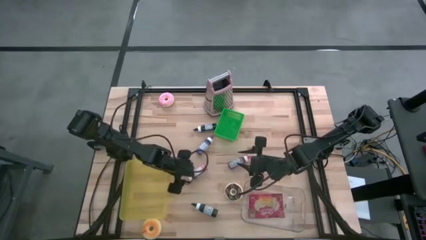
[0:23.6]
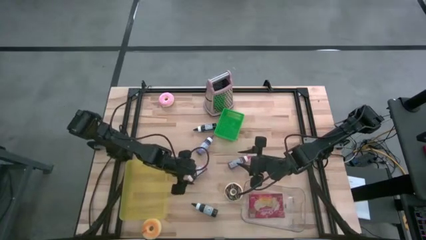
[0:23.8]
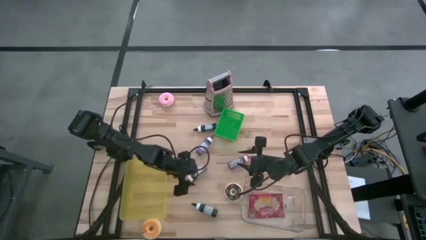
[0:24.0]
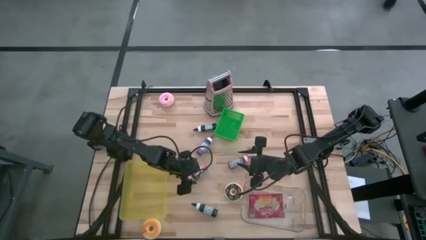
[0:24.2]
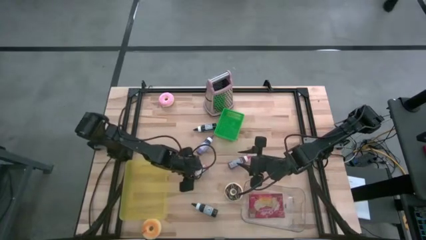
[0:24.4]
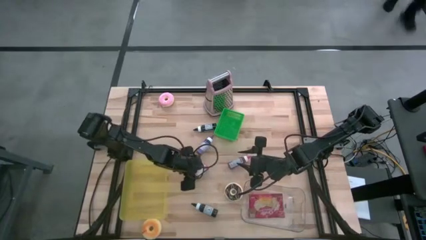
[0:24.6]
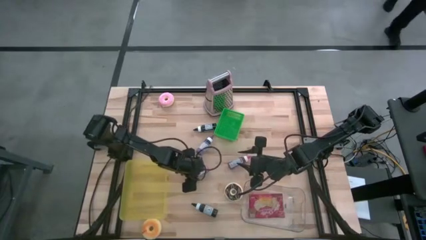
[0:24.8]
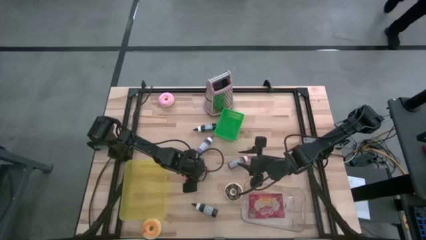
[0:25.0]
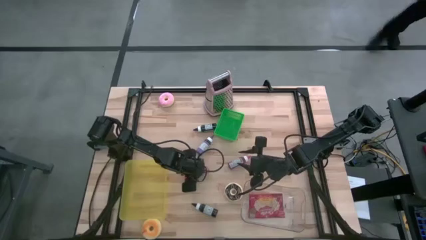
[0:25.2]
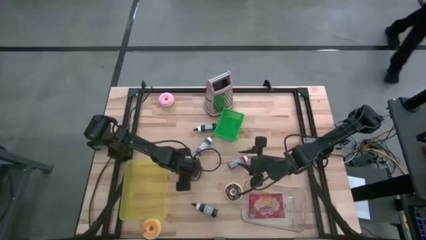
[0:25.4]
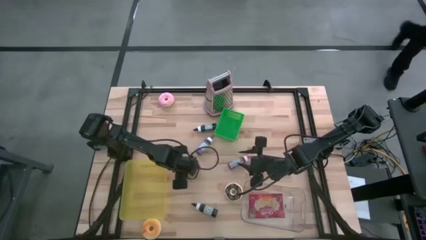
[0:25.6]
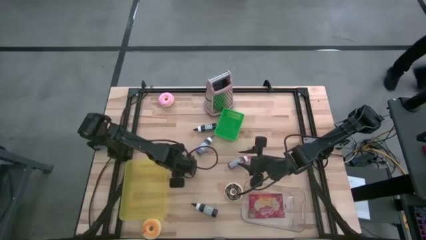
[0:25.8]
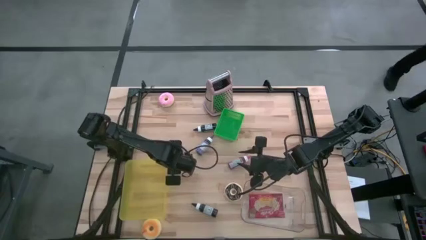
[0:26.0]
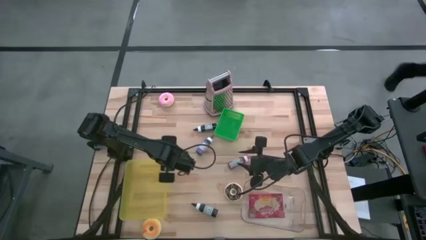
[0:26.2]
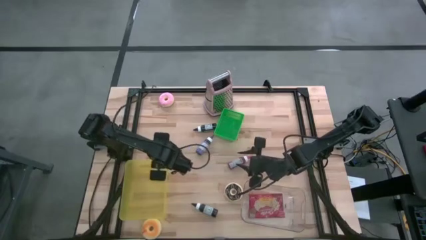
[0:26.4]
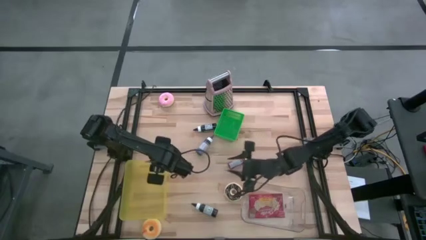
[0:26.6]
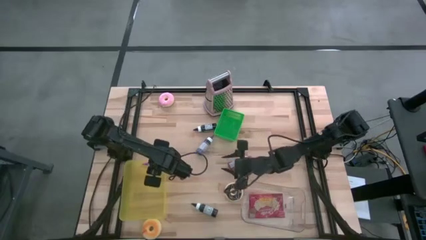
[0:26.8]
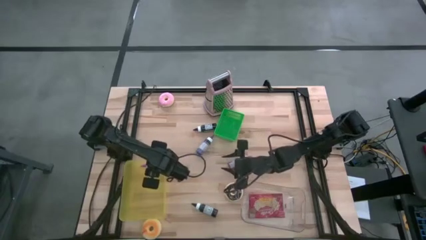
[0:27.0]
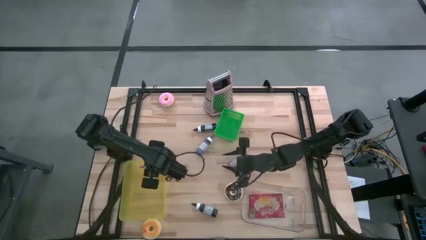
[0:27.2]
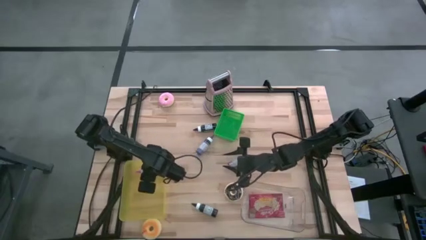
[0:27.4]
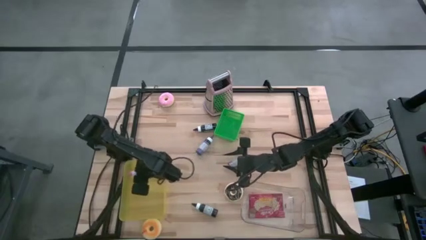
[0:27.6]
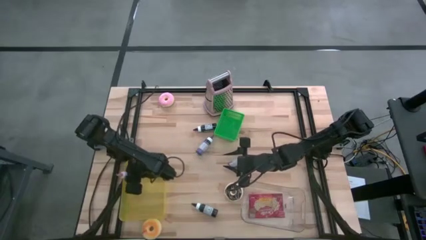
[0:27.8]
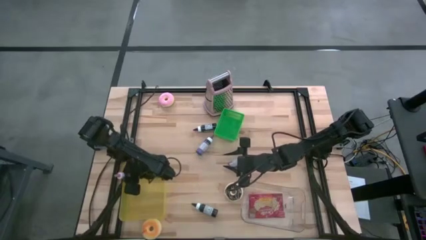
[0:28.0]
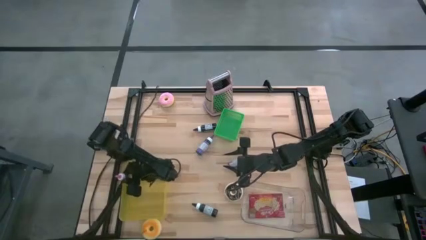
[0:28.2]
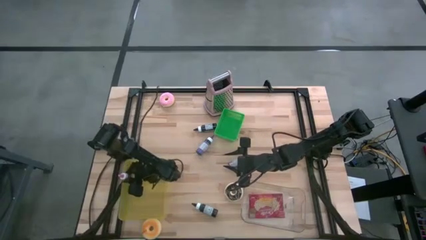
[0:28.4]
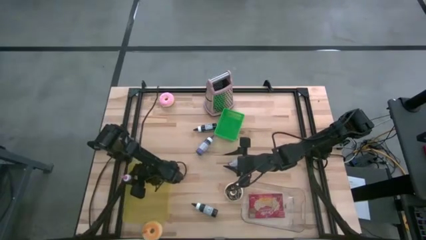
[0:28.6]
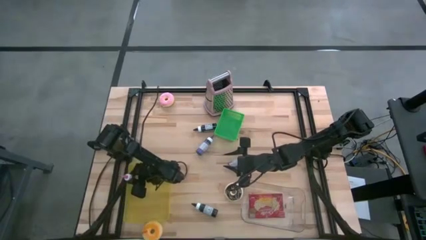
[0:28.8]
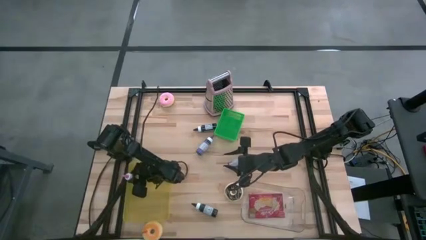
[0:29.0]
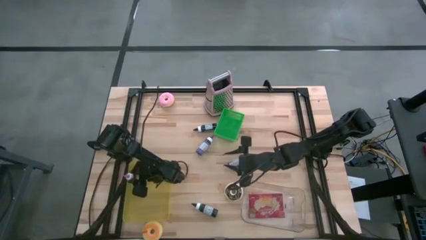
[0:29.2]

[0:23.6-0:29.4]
Task: Pick & Place Food Item
Put the pink ink bottle into the yellow bin

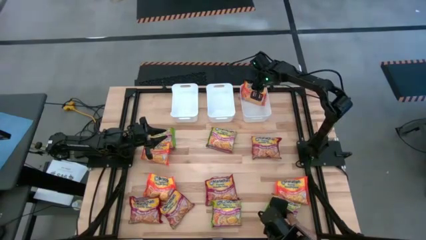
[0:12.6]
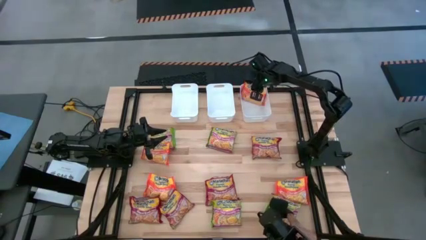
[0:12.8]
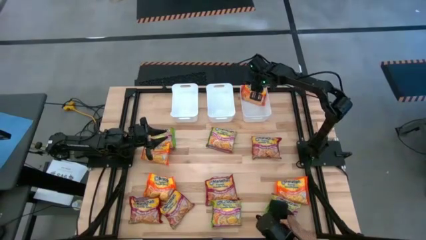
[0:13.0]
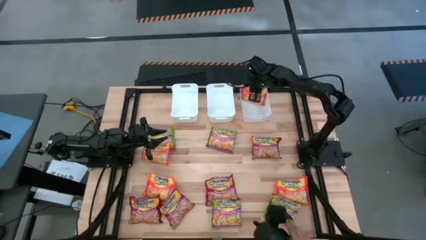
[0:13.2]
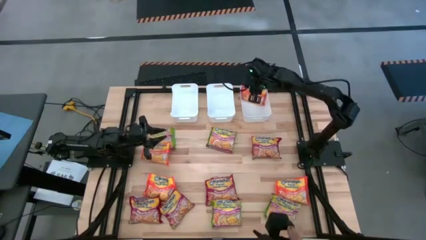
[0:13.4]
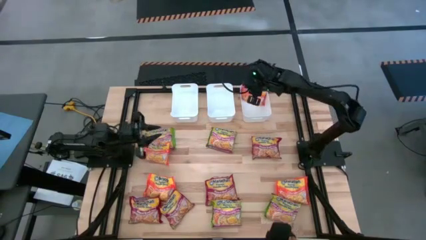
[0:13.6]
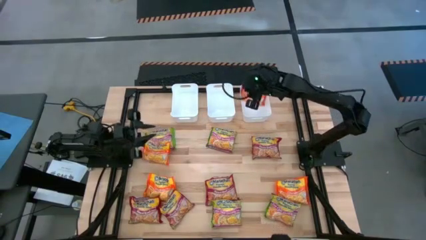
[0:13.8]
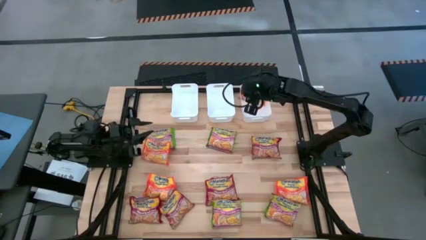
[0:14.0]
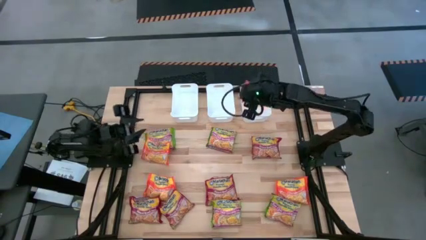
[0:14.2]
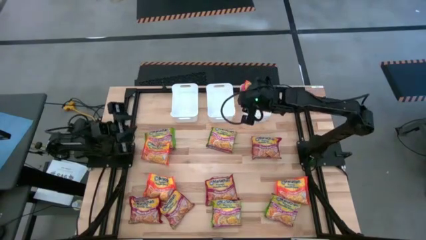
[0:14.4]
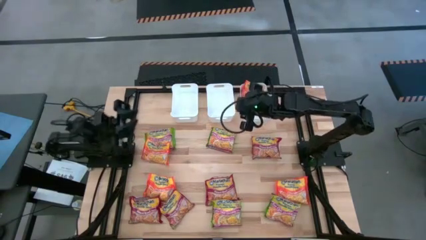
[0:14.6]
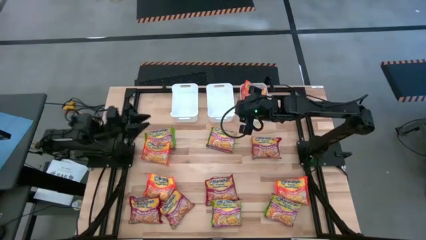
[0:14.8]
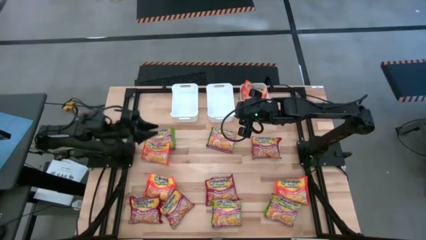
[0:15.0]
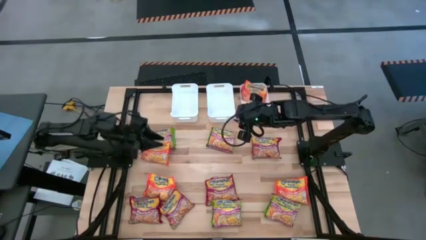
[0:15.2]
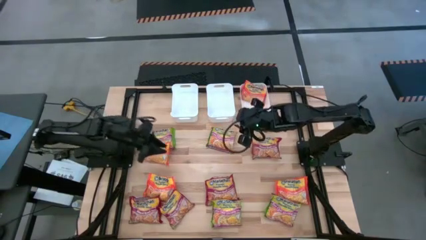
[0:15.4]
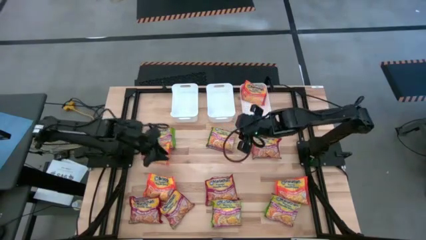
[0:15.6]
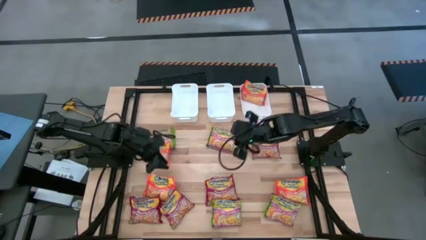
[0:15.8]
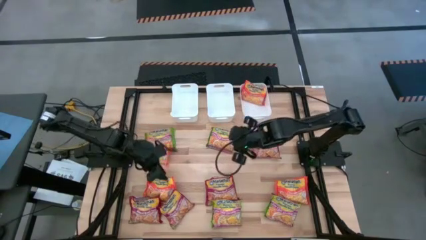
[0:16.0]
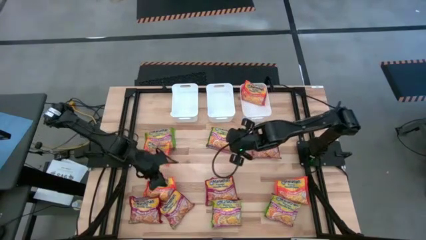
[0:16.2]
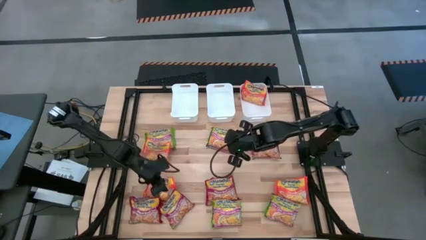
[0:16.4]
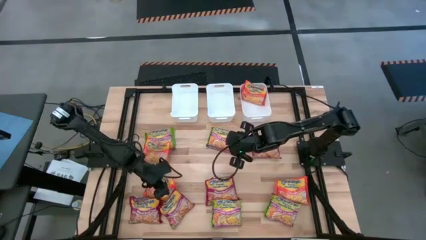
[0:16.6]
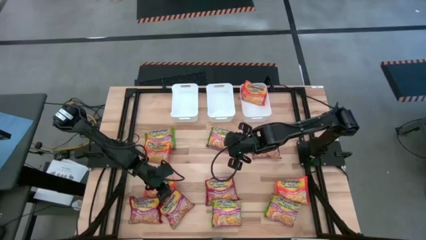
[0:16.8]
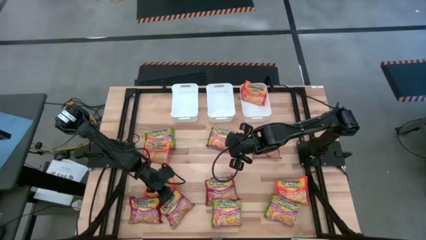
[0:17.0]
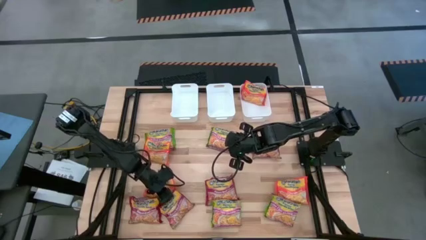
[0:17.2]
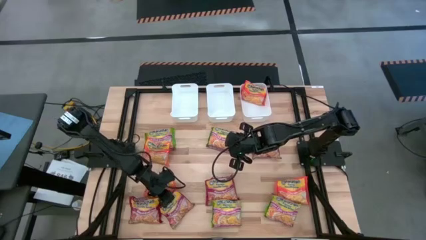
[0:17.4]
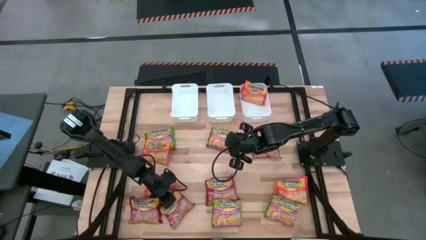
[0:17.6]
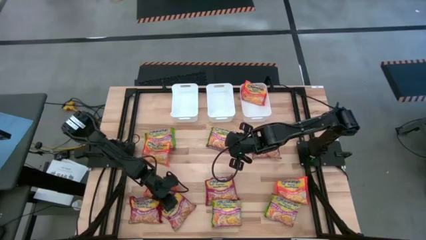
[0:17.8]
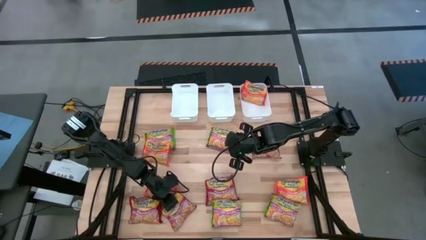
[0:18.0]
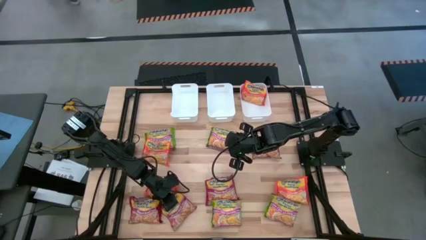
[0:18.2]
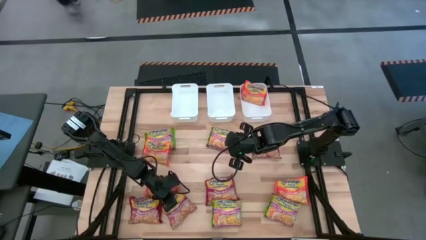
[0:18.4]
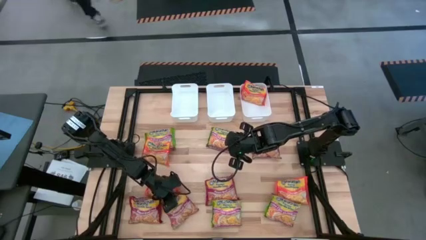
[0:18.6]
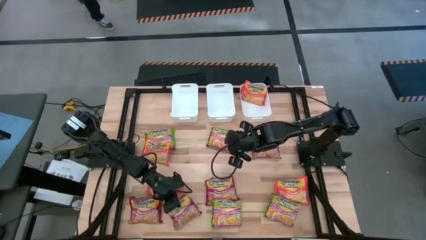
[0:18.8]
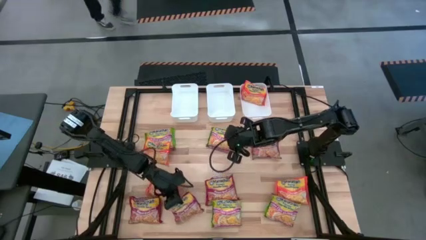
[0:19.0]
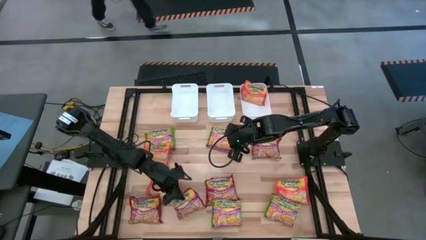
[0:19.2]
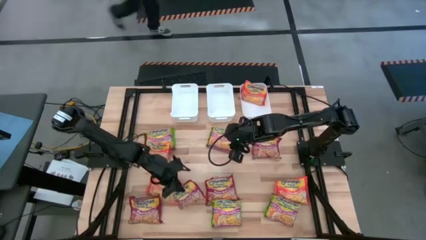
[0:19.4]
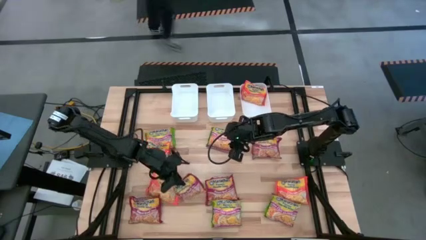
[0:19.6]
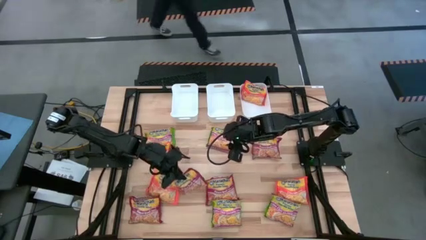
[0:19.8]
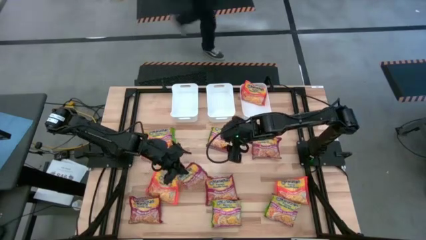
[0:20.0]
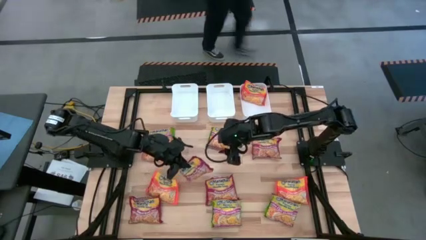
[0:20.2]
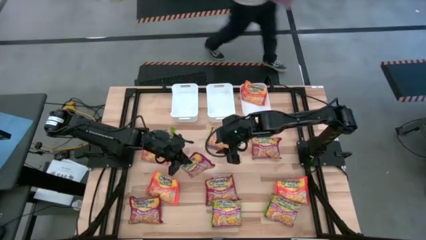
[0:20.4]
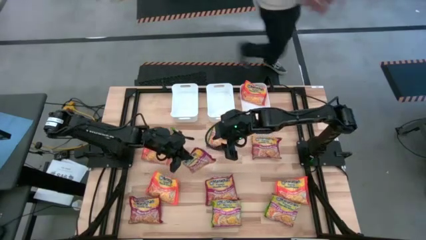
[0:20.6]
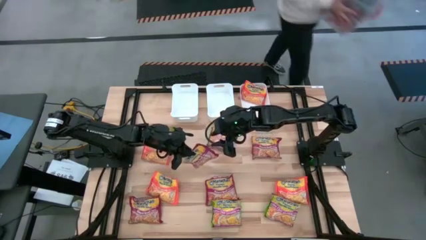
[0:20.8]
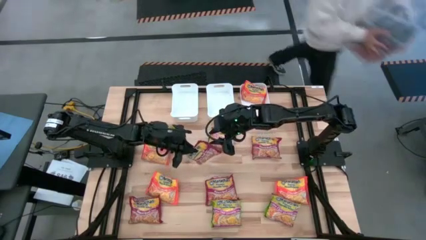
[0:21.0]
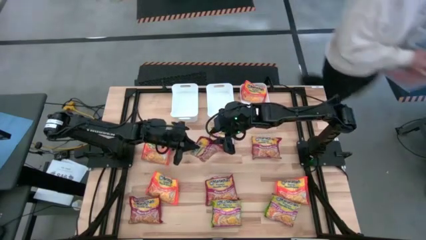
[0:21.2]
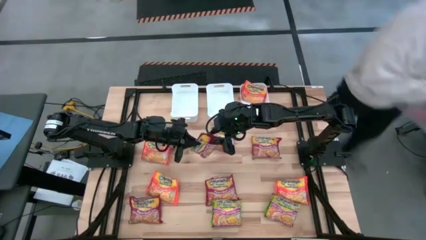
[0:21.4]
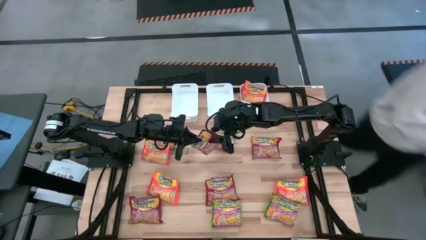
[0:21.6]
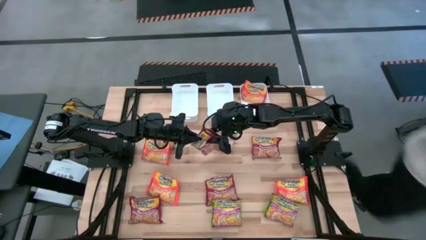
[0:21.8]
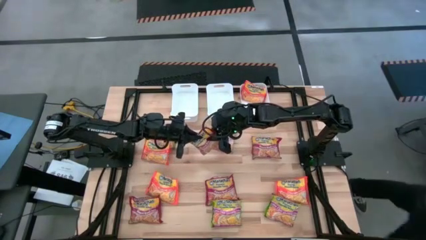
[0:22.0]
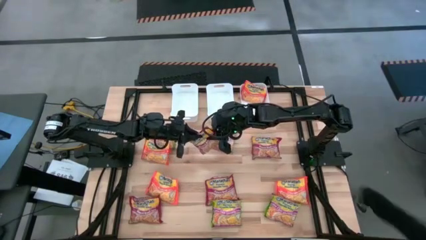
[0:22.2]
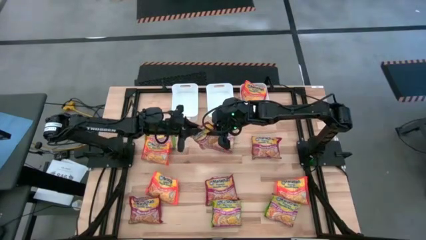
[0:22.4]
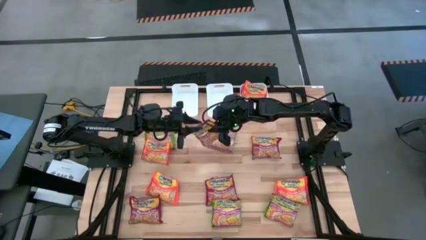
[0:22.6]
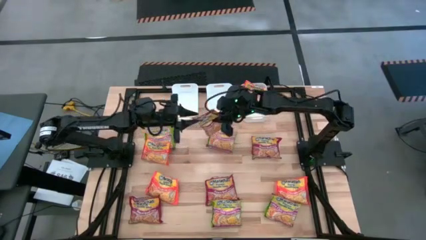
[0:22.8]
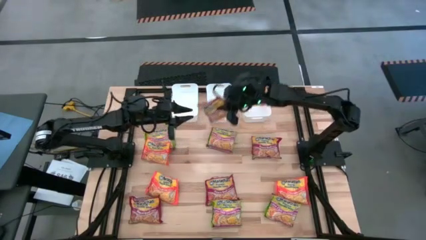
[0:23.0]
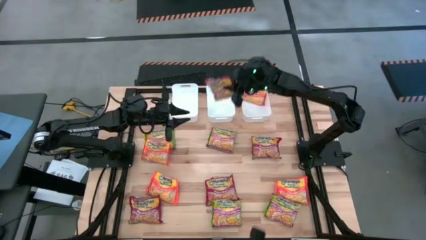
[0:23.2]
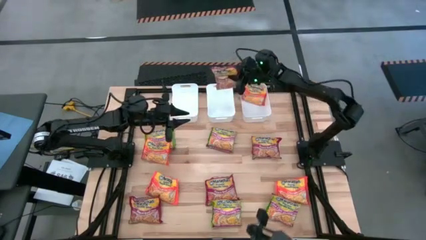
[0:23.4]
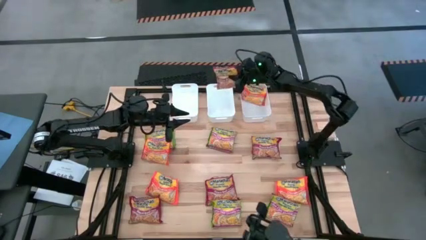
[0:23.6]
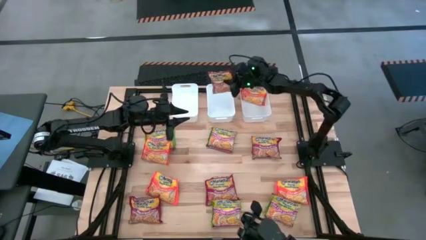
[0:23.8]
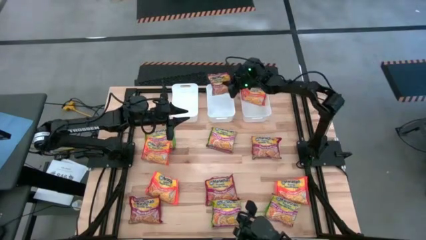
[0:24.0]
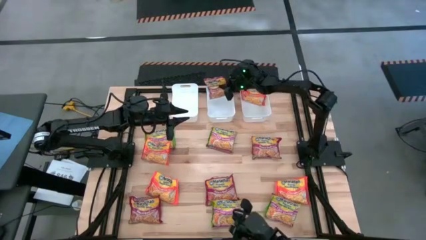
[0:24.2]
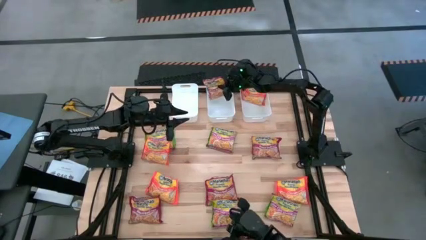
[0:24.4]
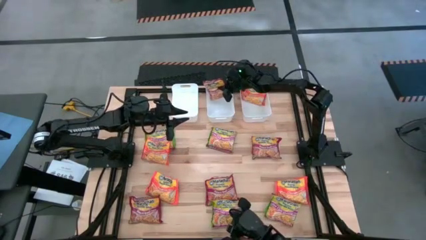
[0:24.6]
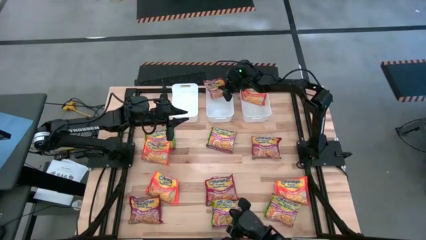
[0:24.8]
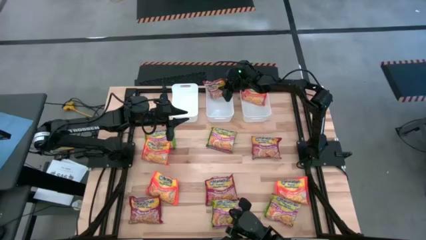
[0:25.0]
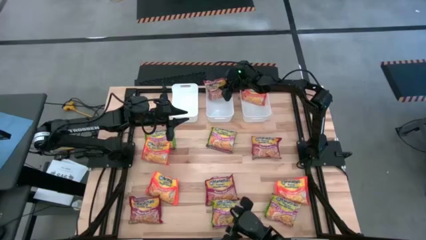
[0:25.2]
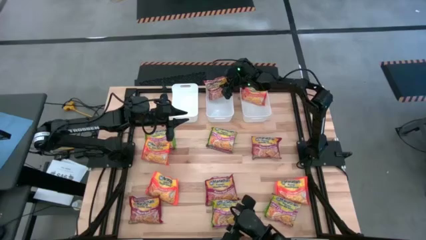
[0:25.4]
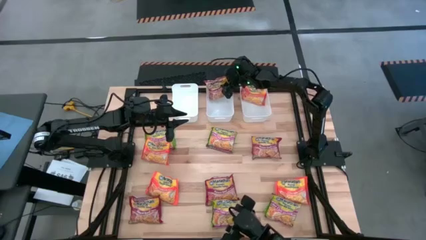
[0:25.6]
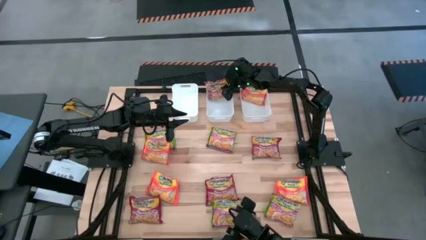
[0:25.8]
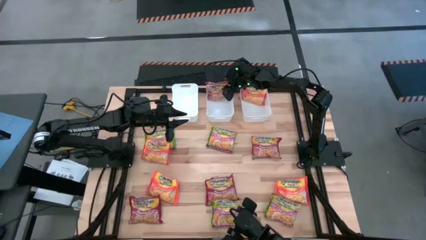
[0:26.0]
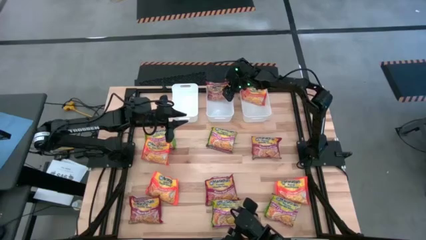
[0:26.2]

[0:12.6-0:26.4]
Task: Sort Maruchan noodles
Put the red noodle pack into the center white bin
